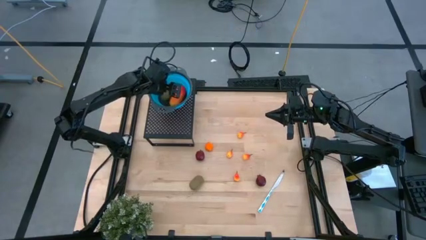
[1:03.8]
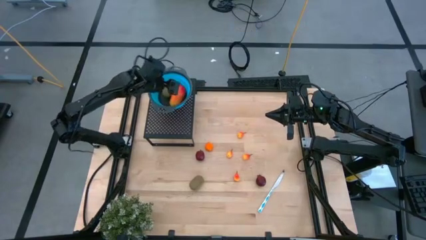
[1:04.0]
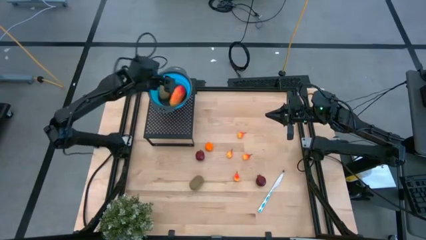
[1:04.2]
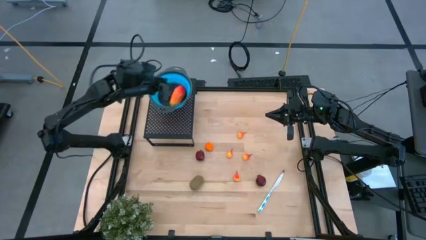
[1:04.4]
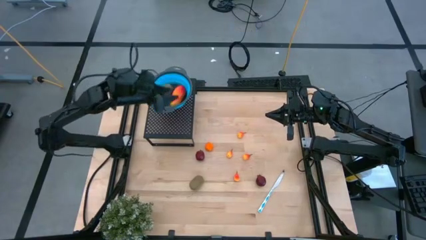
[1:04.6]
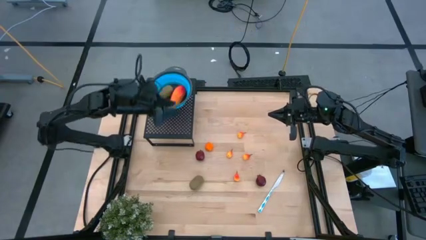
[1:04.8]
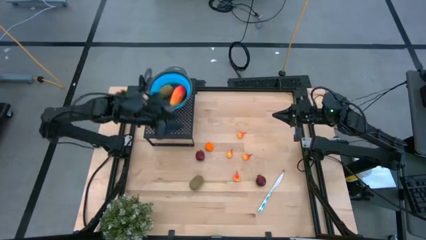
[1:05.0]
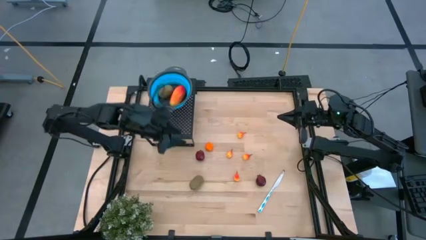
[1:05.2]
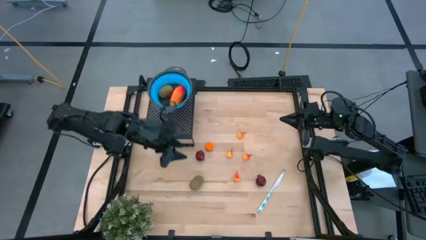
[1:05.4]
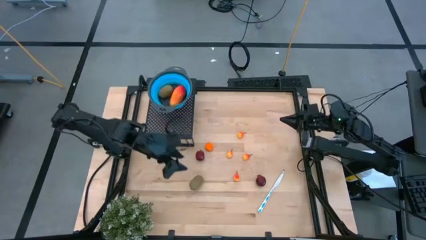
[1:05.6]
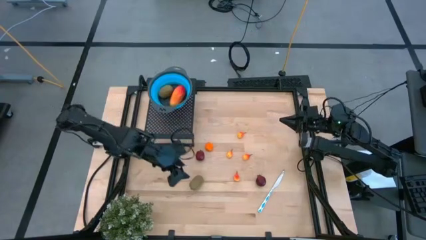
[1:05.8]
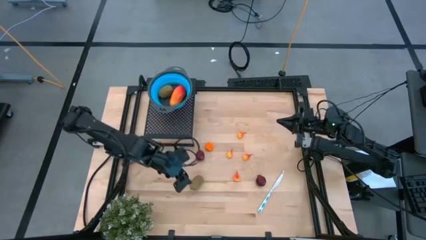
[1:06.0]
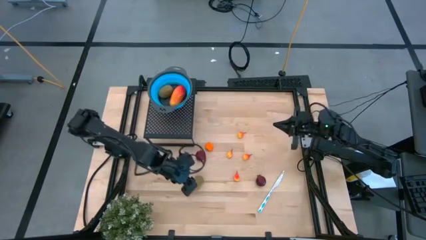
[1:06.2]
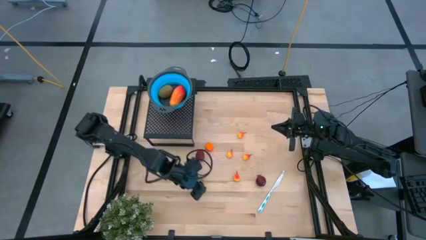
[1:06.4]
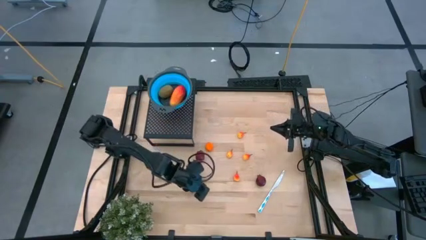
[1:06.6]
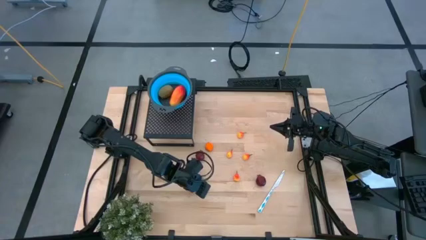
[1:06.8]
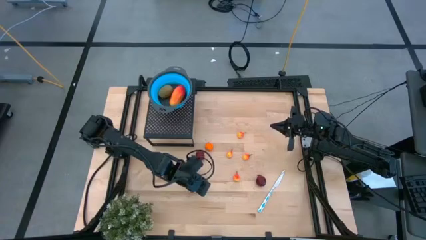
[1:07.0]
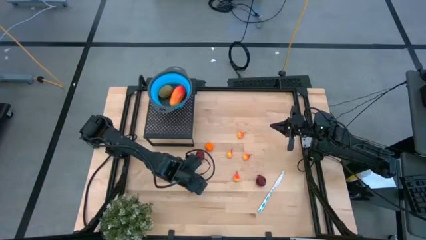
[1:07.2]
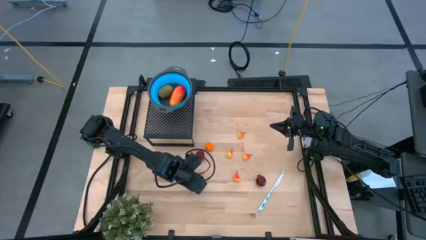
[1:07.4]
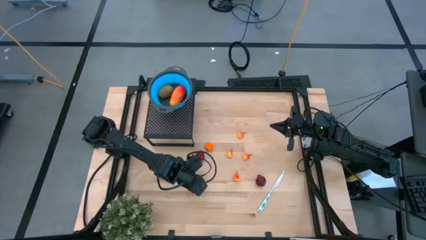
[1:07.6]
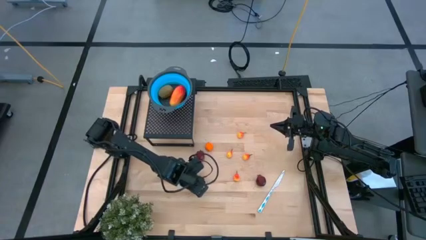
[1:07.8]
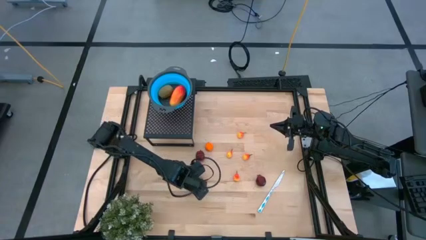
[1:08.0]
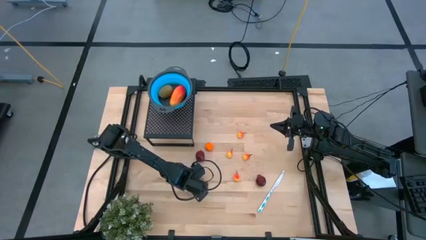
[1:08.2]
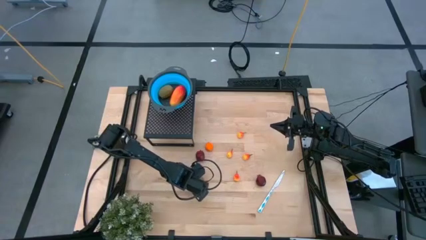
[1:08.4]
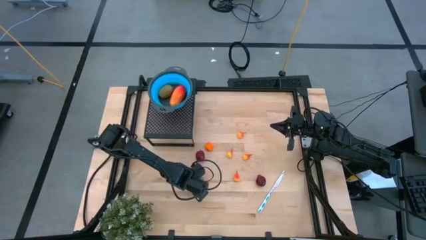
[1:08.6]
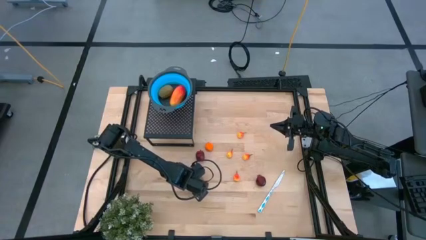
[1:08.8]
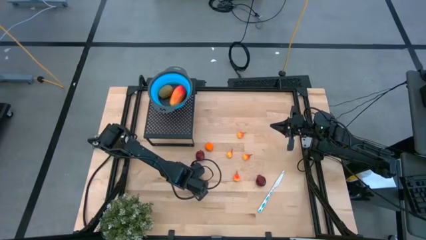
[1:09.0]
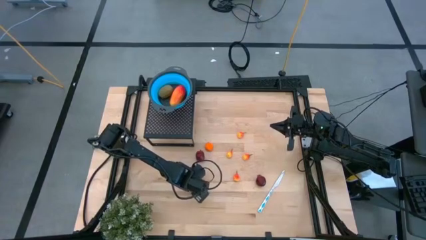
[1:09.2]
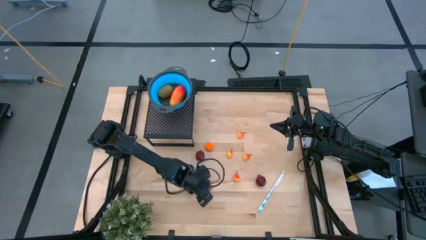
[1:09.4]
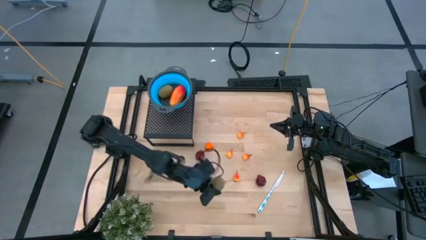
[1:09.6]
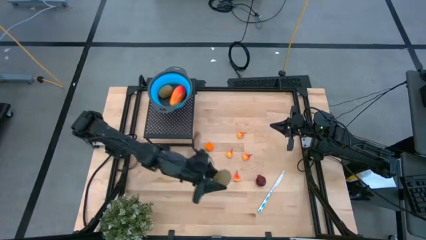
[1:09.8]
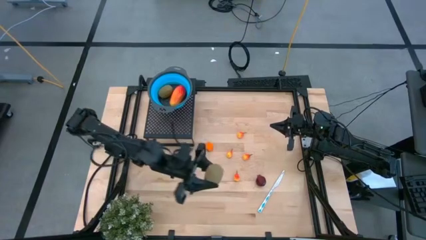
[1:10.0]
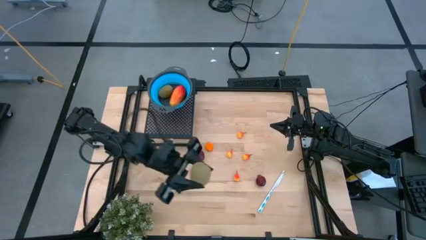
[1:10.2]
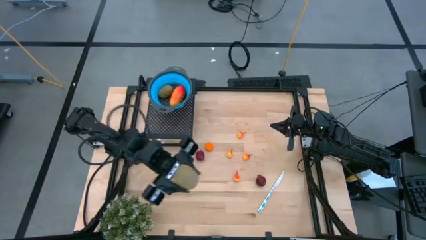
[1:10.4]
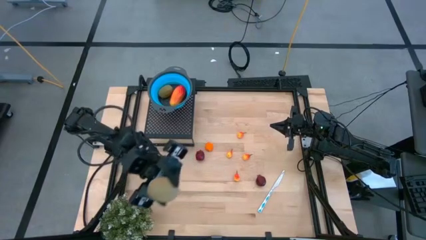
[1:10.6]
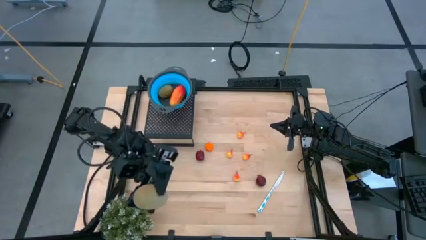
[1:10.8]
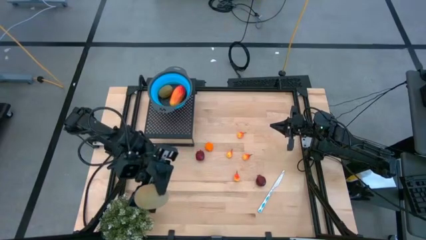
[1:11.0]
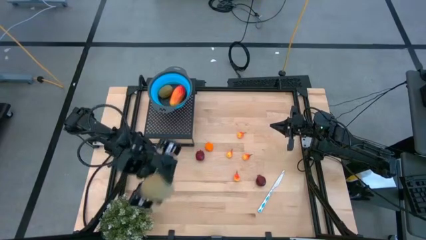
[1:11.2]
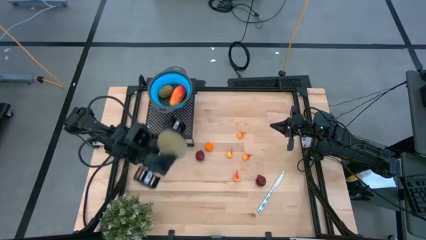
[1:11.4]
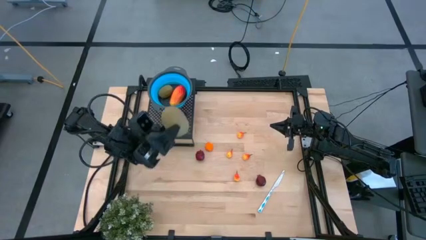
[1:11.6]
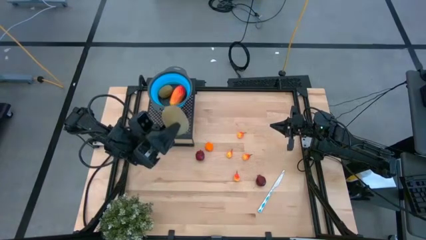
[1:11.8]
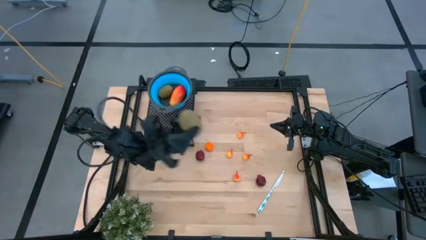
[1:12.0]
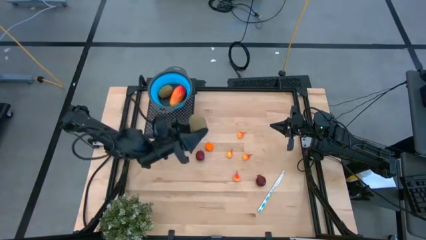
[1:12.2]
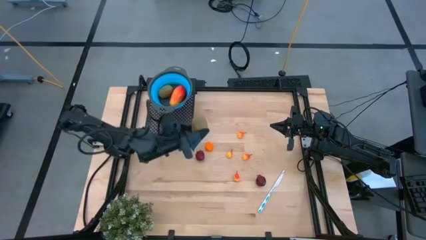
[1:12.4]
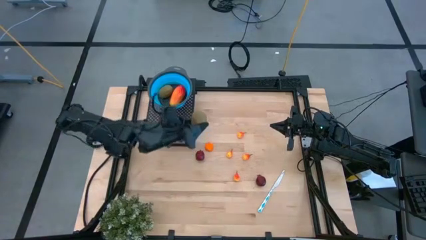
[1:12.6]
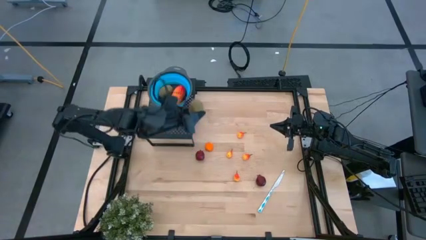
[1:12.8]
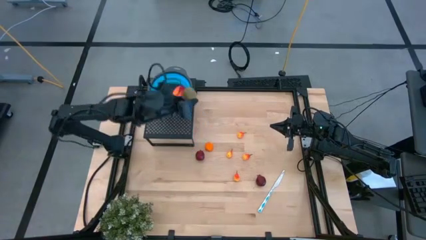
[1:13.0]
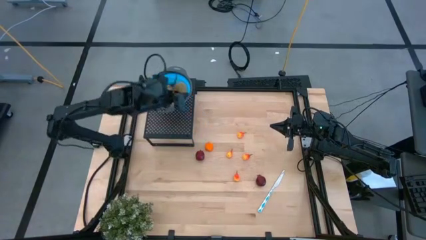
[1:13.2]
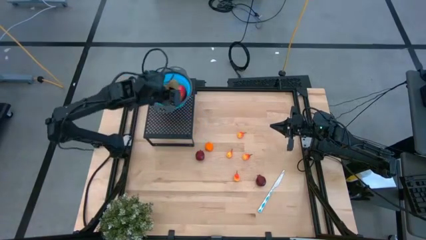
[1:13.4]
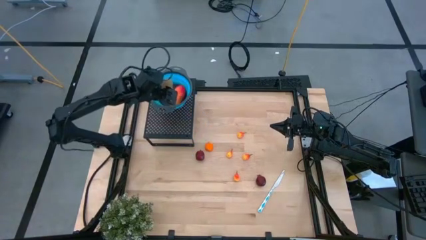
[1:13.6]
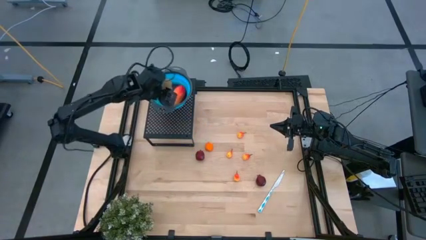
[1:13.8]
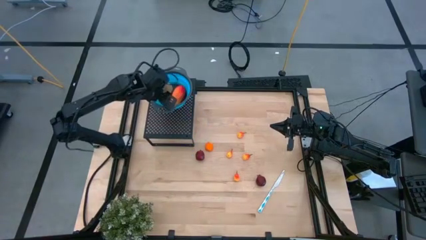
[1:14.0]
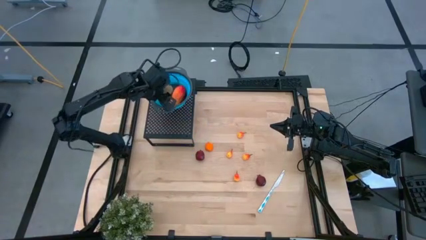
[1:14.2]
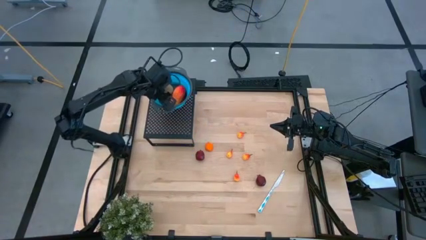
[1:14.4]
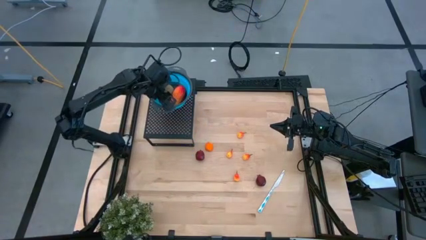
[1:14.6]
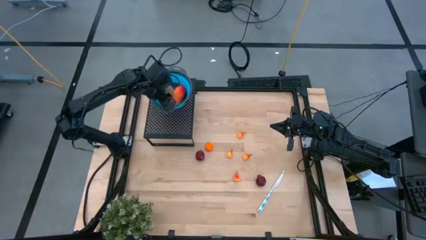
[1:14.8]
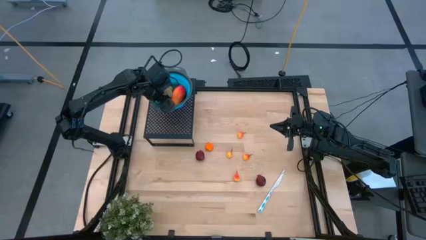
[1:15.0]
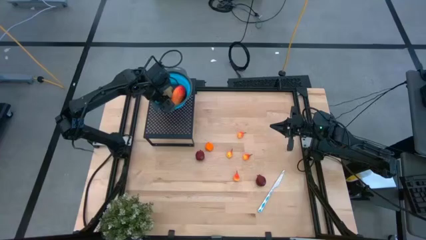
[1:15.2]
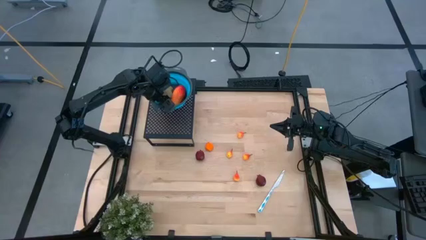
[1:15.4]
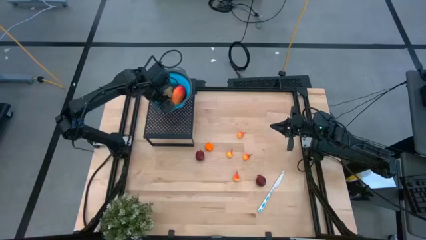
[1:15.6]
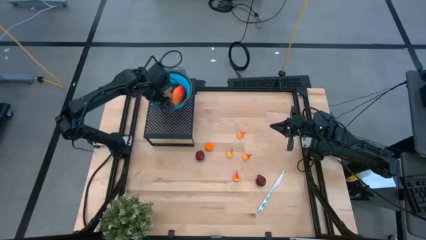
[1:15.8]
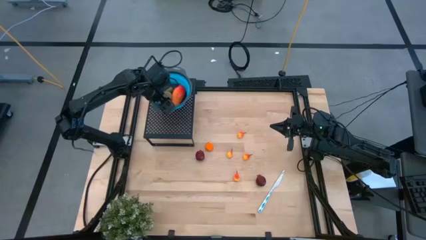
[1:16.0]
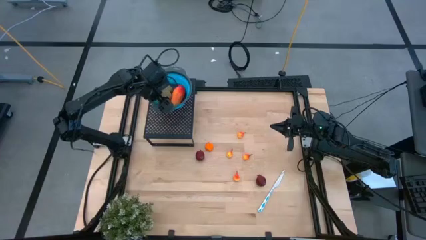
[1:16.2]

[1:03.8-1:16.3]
Task: Pick & Place Fruit
Put the kiwi into the blue strainer bowl on the shelf

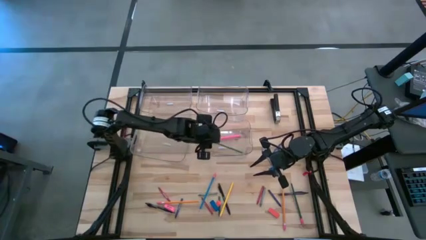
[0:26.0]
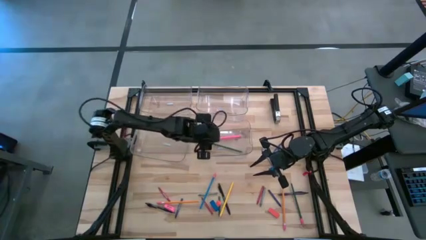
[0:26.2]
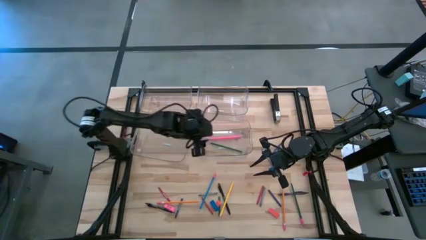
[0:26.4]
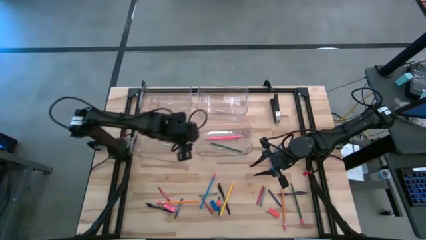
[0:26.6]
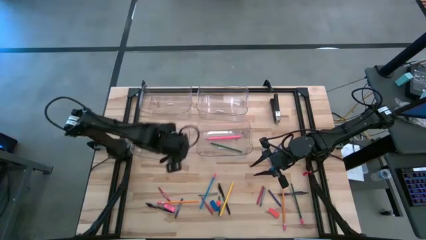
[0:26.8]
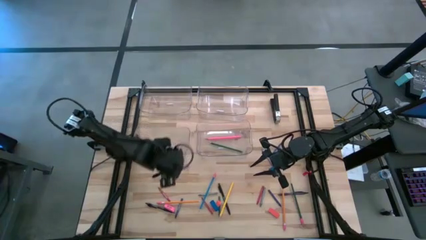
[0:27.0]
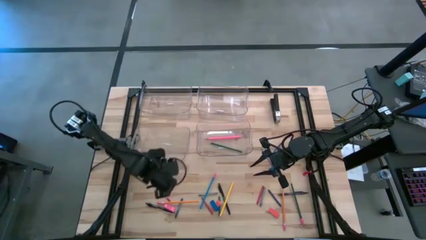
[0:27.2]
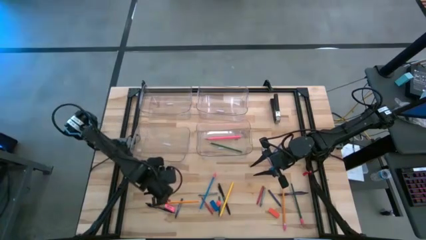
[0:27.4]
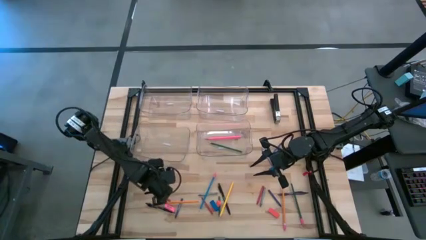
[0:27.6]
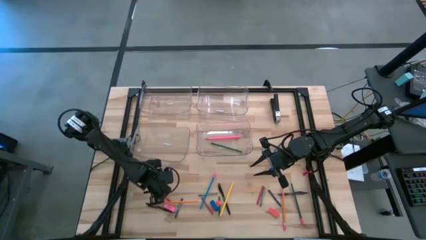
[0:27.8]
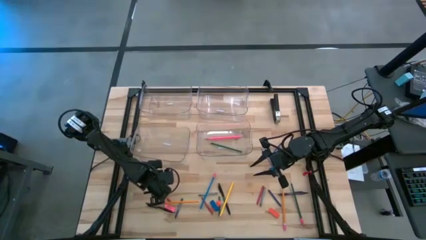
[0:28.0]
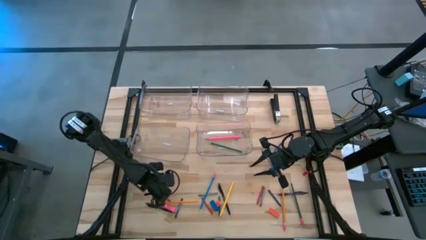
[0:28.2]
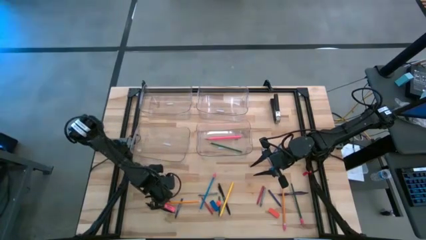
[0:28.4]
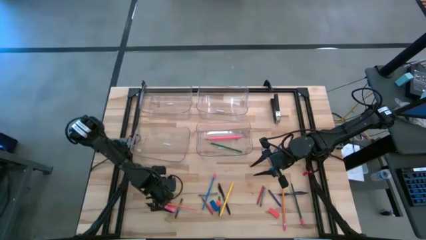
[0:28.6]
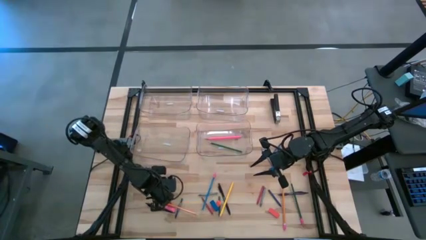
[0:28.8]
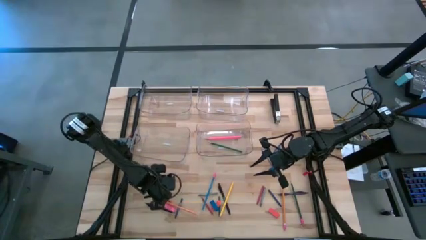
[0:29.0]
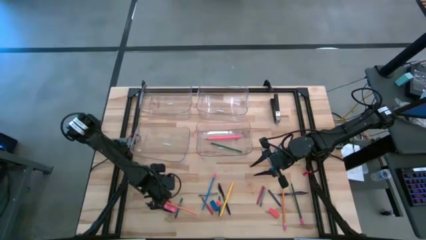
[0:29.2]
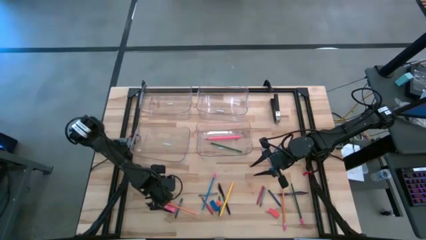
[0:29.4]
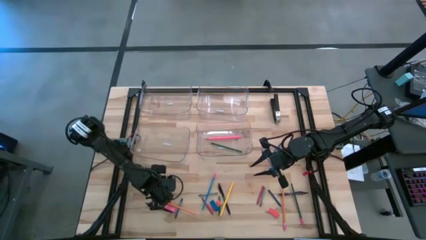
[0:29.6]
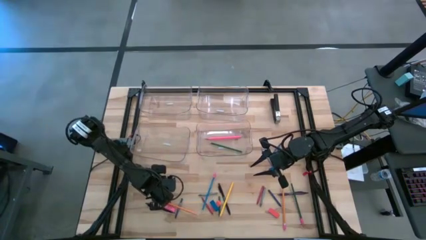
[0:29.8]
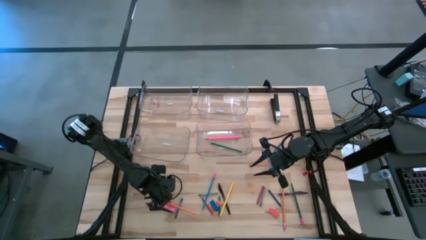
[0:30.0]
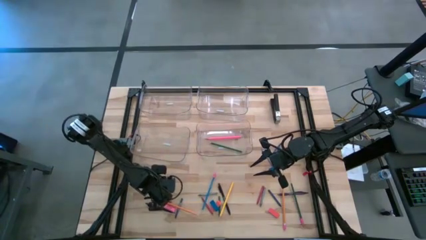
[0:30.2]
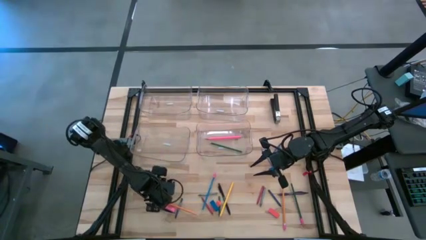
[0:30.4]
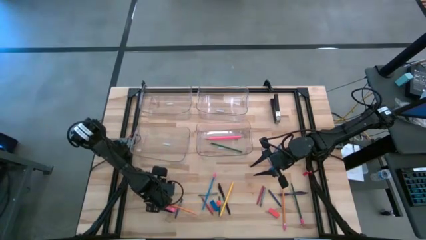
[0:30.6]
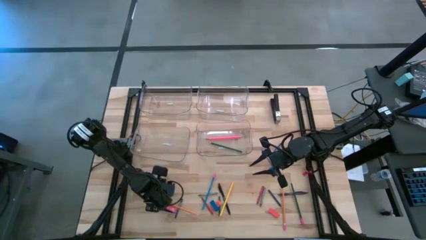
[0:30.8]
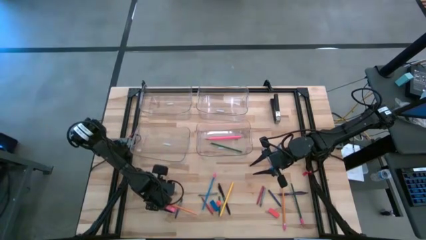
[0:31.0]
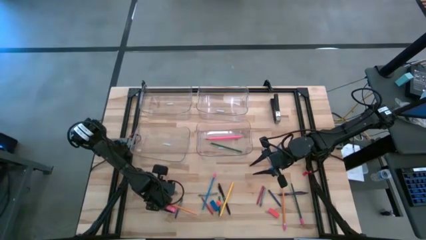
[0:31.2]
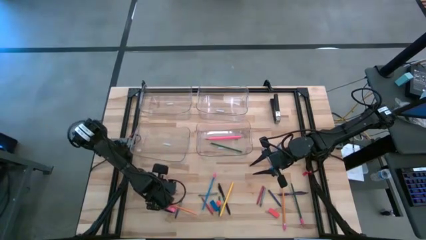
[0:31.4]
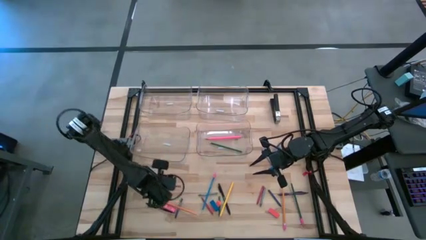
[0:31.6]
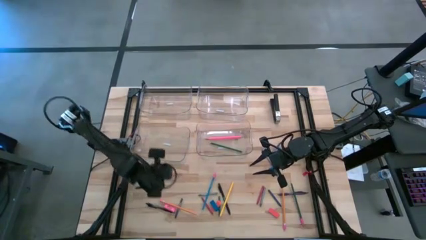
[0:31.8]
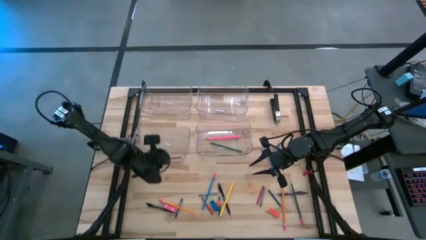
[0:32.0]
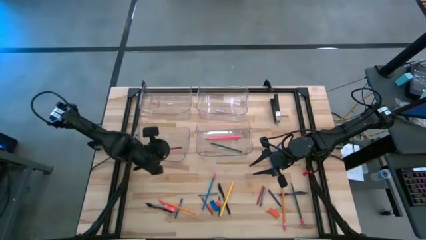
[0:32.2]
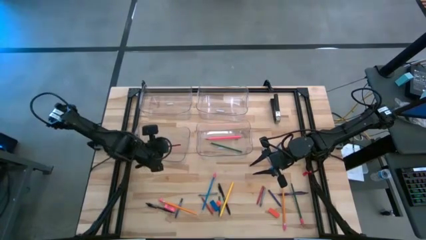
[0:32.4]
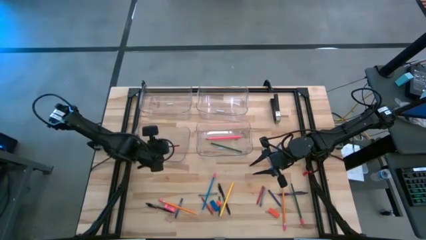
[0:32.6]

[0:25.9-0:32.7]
Task: Sort crayons/erasers/pens/pencils in bins
Put the left red crayon into the bottom left transparent bin
